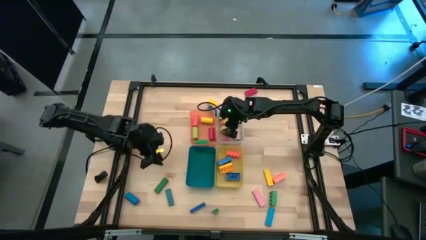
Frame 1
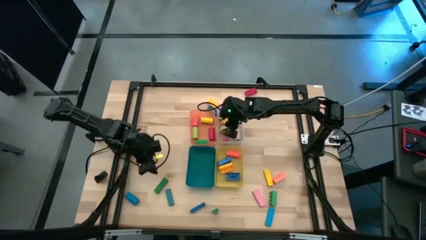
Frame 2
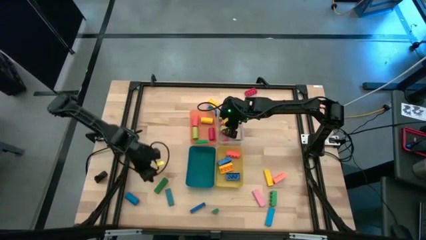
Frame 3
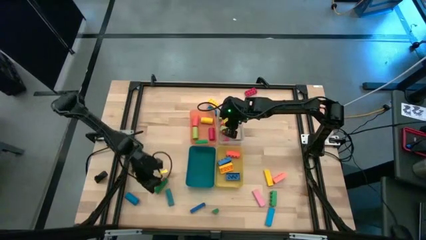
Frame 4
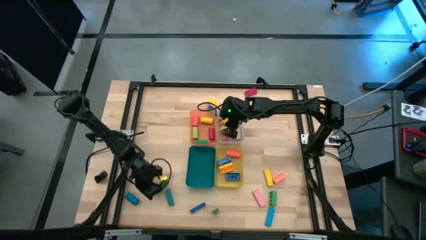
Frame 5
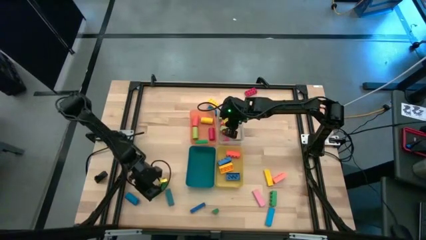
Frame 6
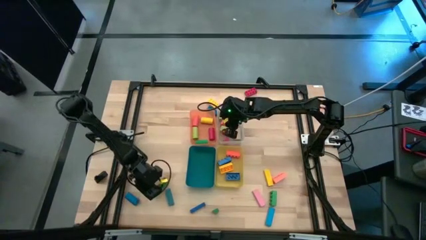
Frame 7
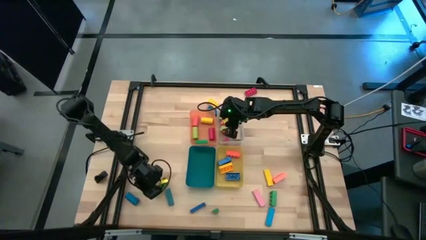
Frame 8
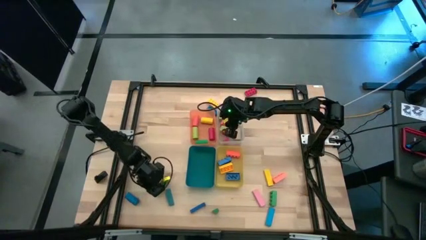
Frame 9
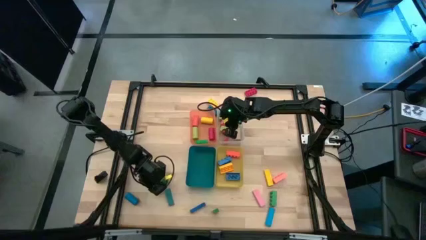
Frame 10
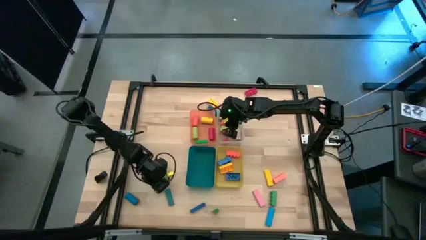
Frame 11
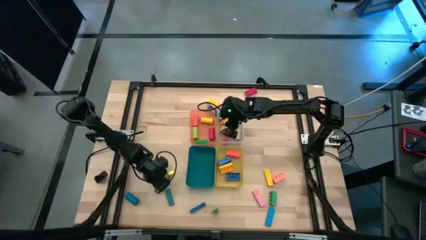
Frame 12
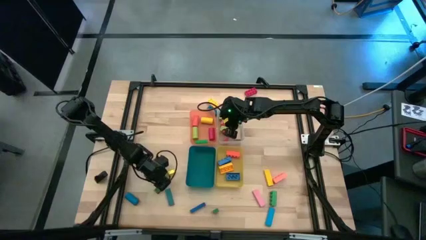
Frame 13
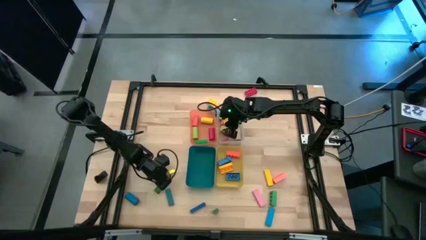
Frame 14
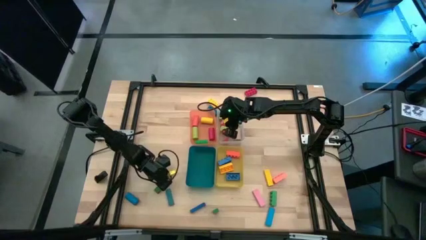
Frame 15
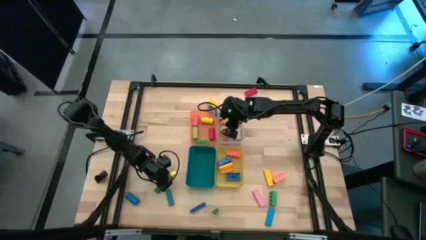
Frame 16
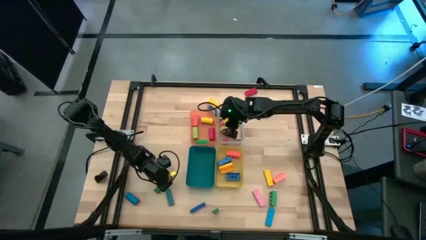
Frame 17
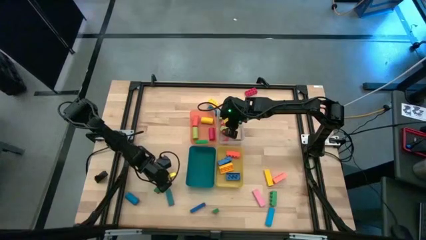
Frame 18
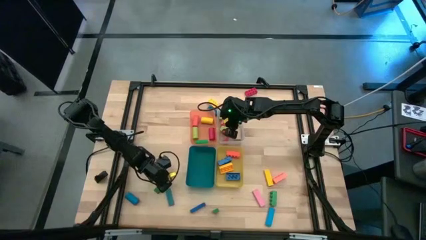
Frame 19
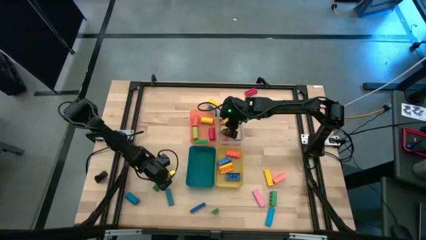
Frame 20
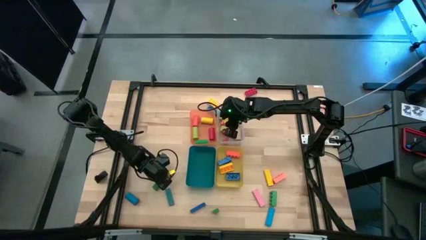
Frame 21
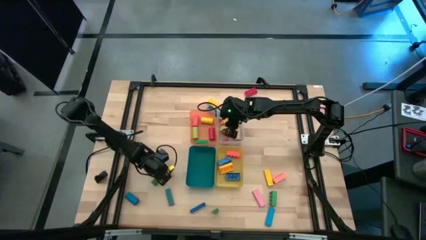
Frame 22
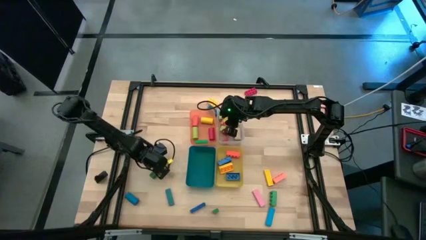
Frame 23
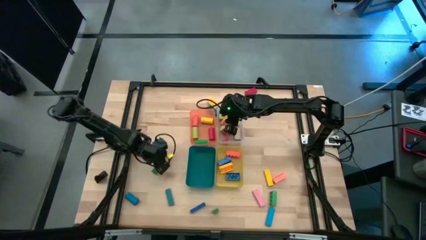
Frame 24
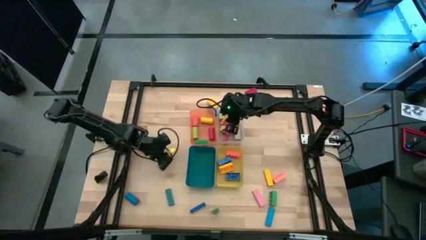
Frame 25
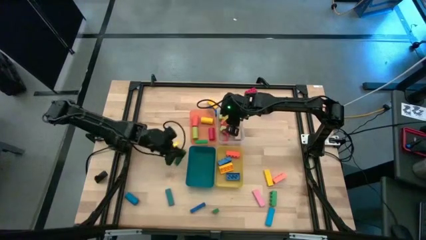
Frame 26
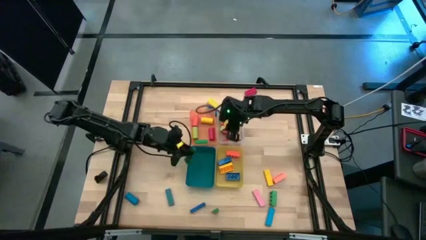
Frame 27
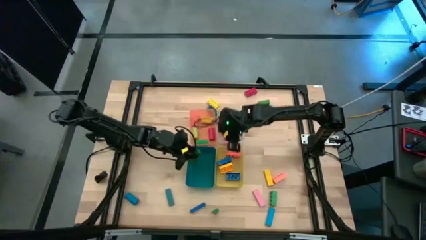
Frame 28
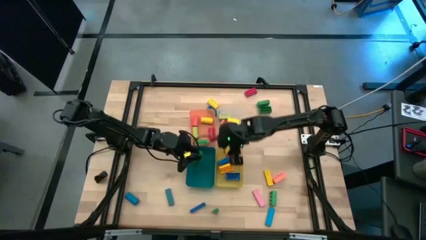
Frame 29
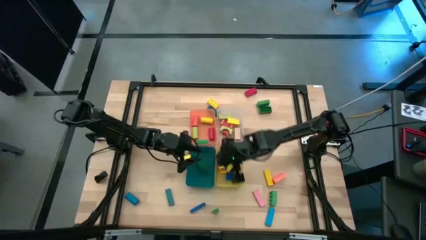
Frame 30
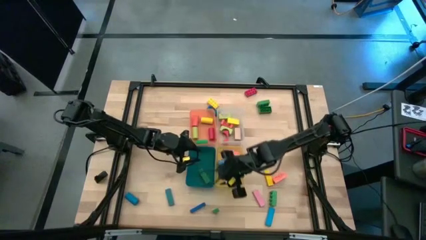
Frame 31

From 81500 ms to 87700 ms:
Task: Sort blocks by size
Put the left green rectangular block into the blue bin

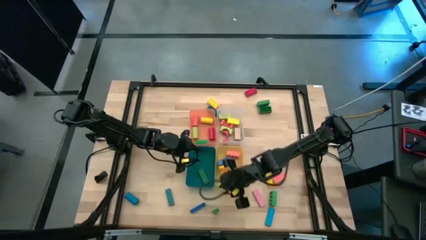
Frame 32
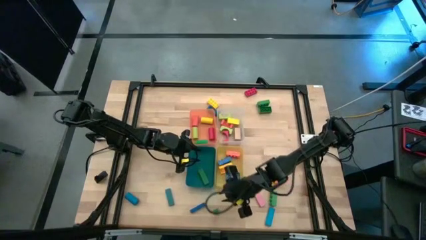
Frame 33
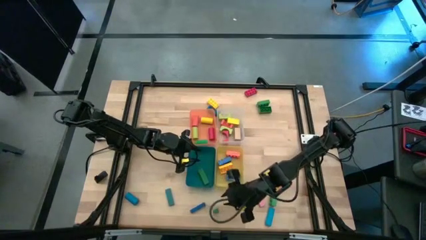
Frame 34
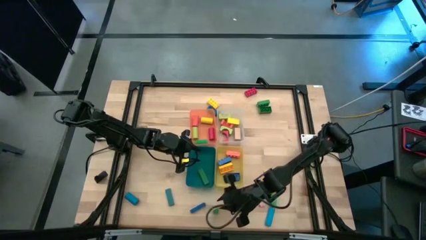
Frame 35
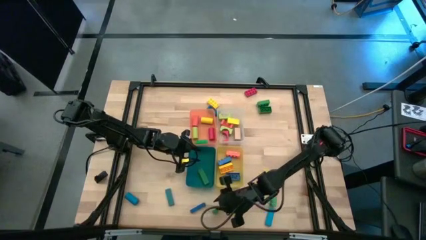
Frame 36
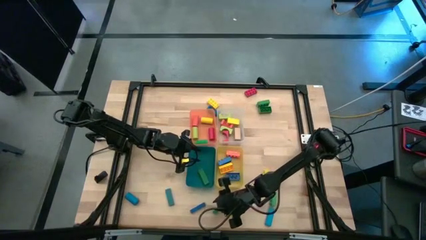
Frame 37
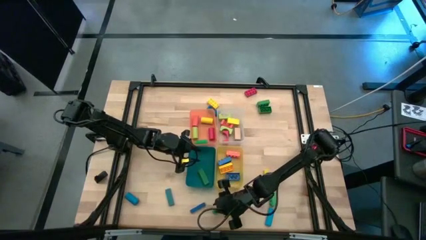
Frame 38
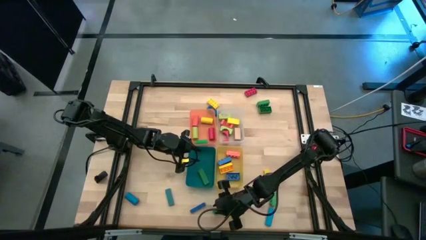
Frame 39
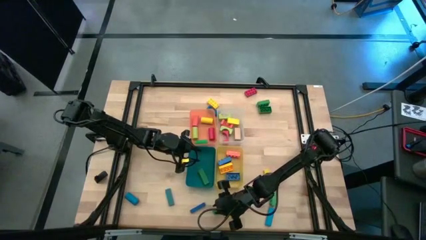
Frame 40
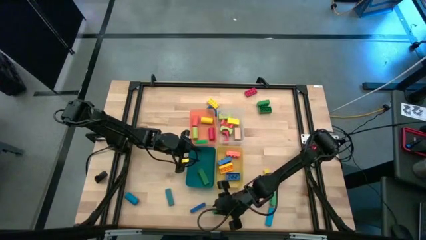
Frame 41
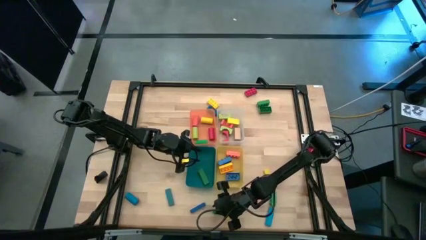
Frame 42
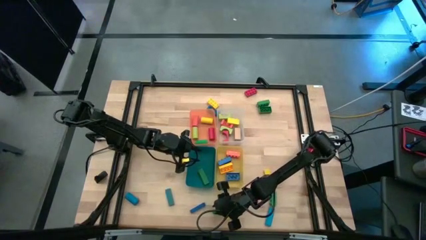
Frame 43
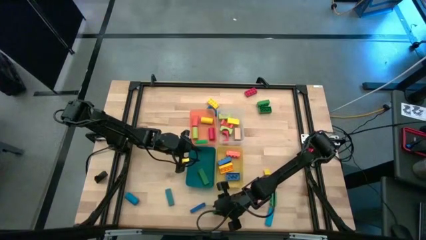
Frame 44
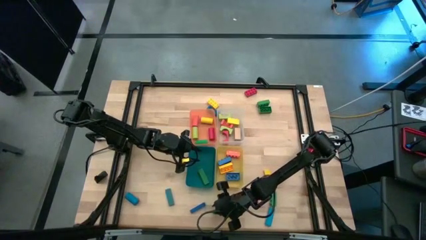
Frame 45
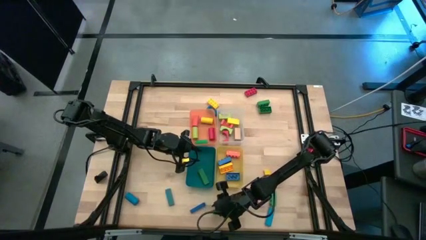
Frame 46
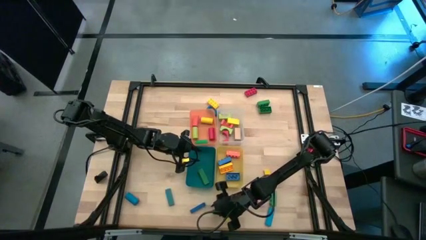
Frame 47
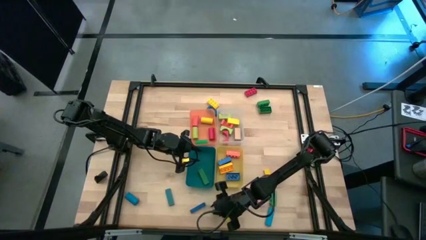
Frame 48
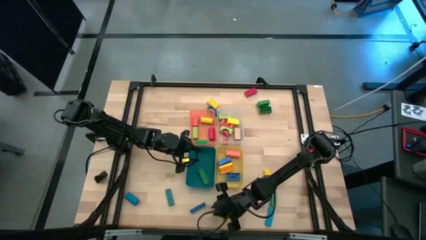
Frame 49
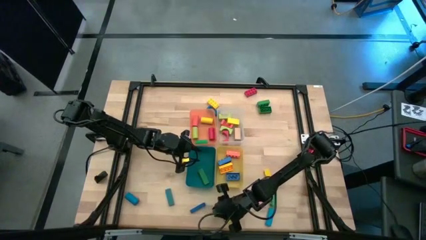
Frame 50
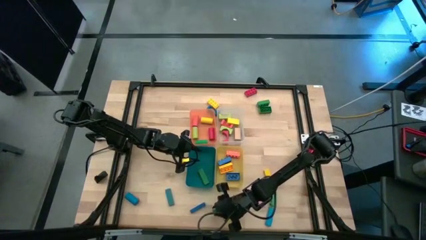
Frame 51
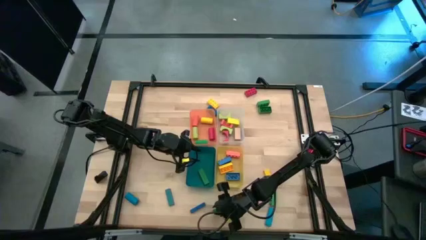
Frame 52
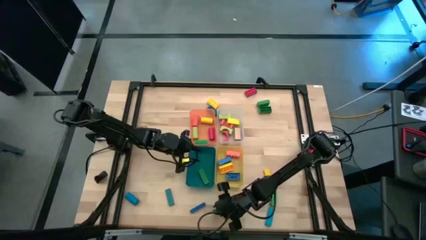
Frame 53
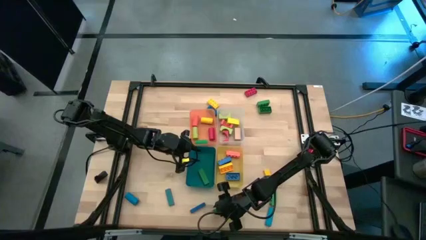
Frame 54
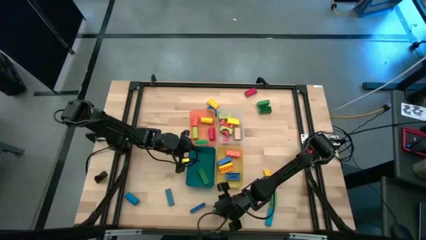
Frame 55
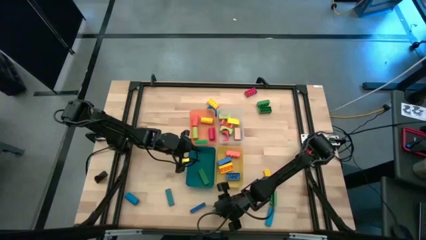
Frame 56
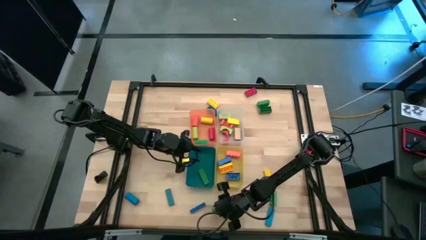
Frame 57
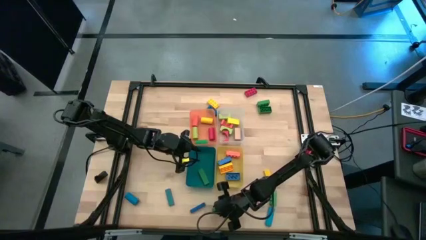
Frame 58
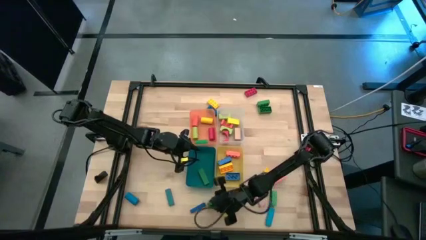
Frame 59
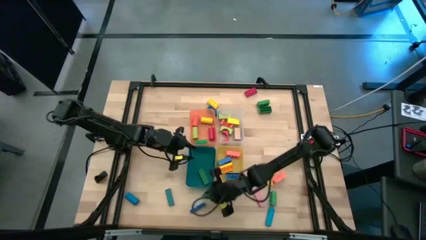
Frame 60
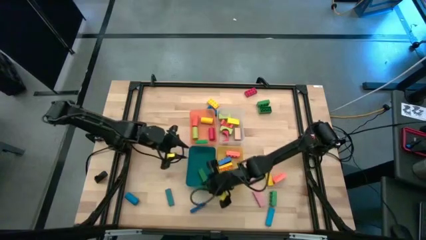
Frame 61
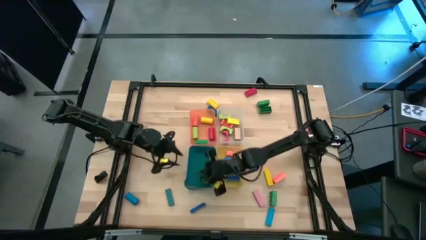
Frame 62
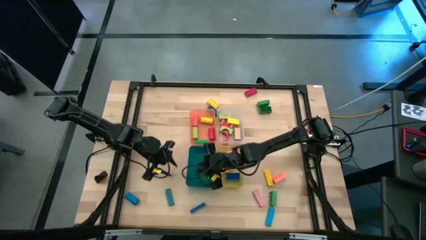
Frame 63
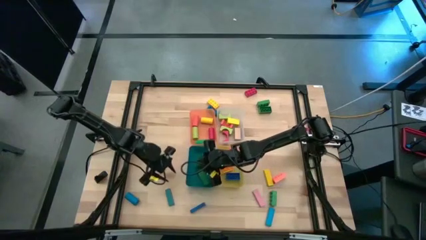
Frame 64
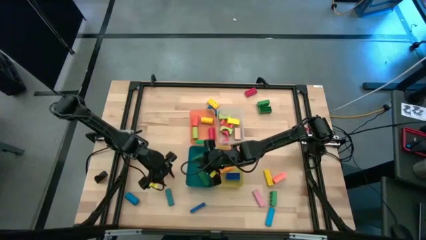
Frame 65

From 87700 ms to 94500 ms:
Put the green rectangular block into the blue bin

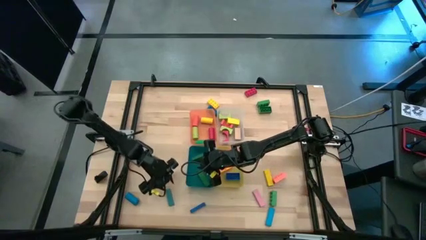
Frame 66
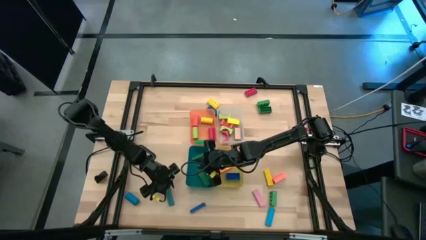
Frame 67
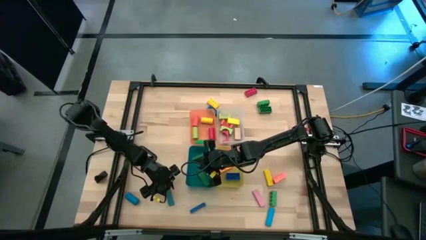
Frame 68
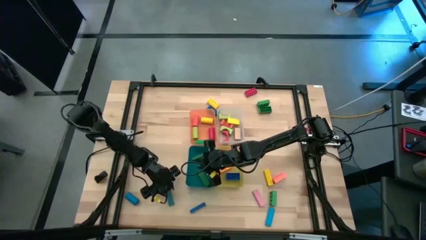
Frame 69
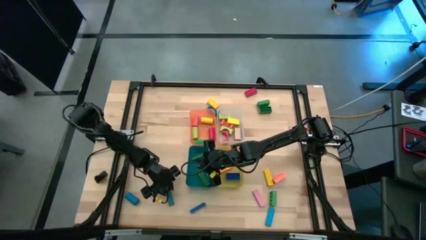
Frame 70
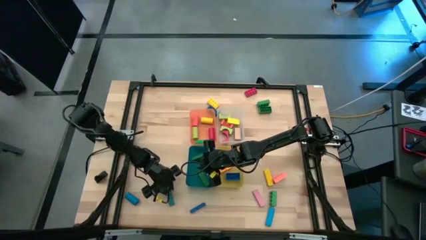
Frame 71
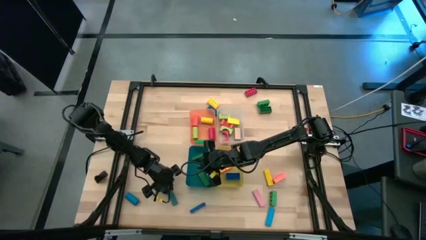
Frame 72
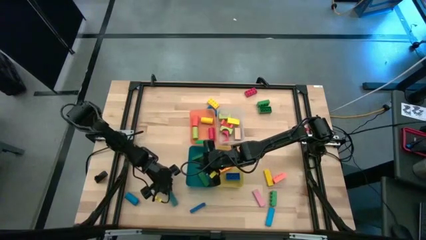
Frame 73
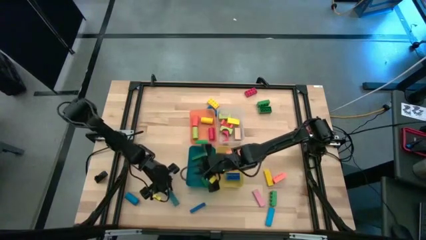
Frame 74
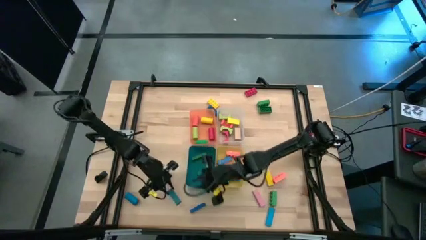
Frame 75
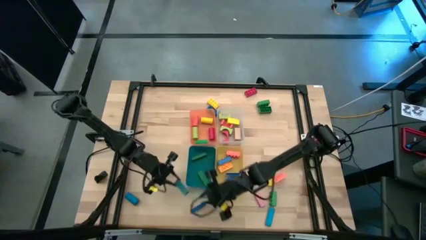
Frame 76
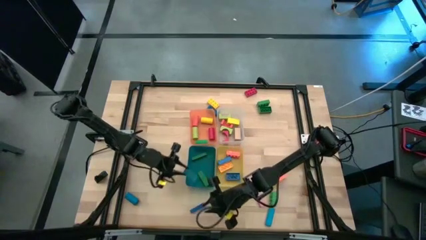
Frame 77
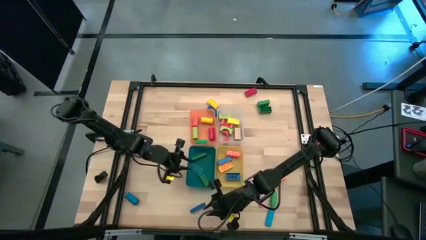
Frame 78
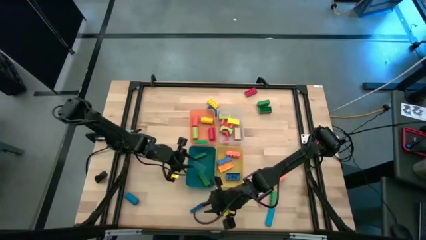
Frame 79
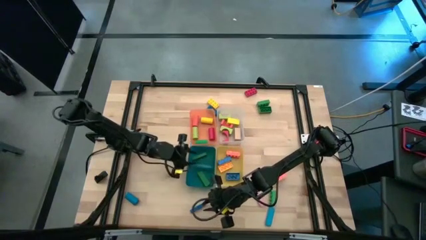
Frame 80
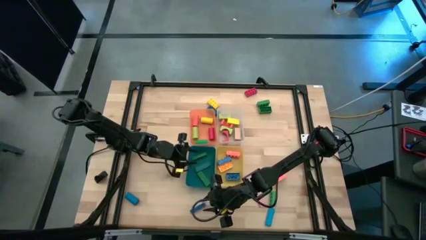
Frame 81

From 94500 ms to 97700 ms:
Put the left blue rectangular block into the blue bin
